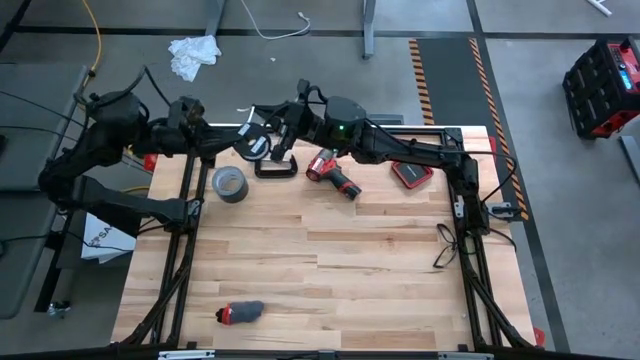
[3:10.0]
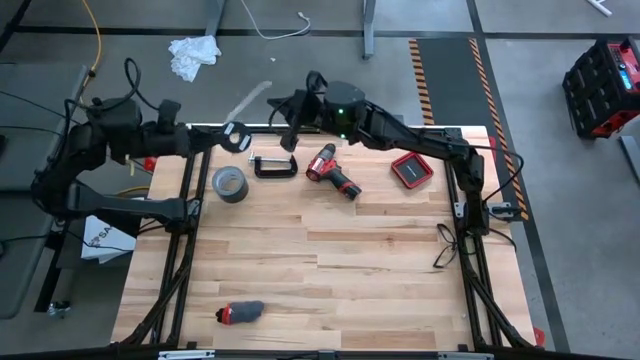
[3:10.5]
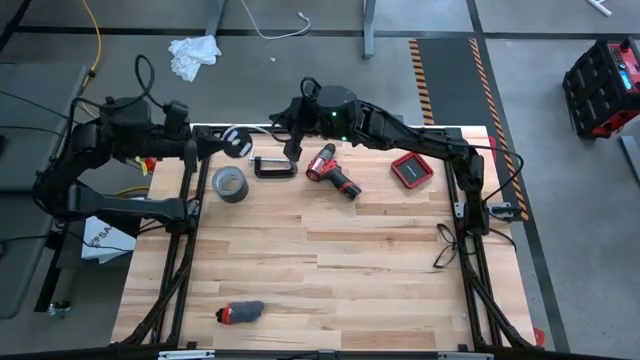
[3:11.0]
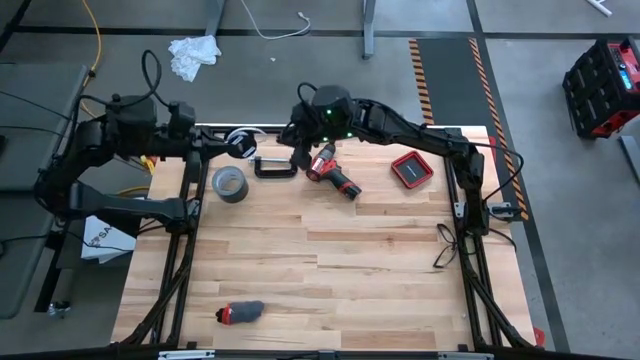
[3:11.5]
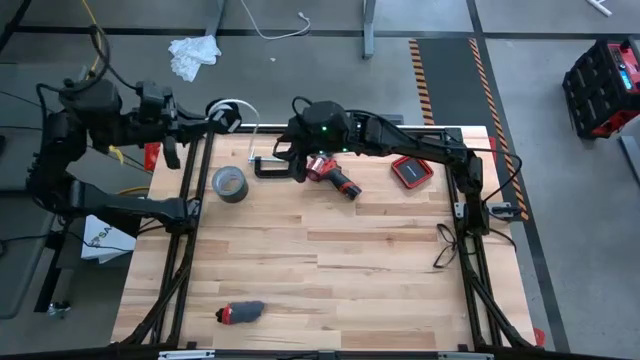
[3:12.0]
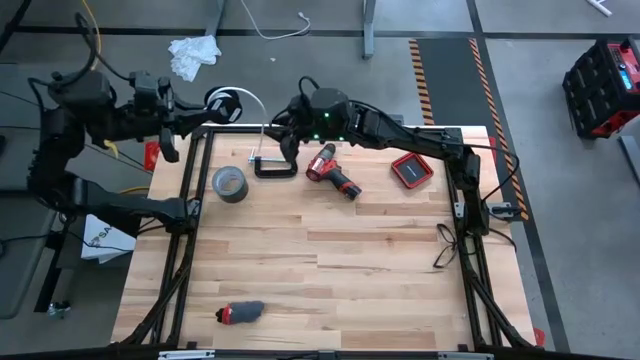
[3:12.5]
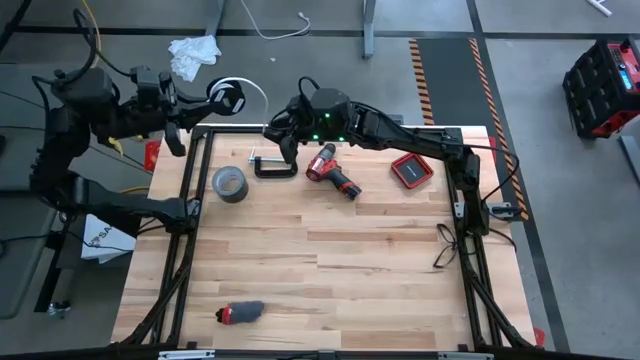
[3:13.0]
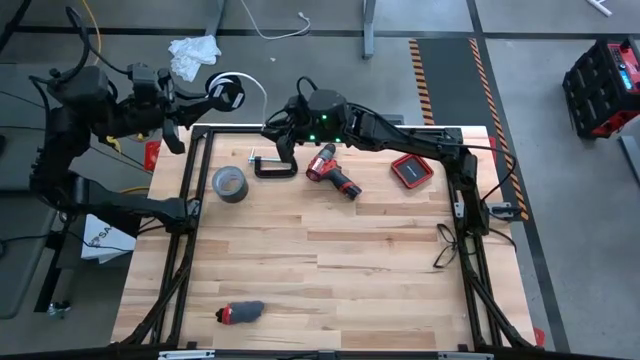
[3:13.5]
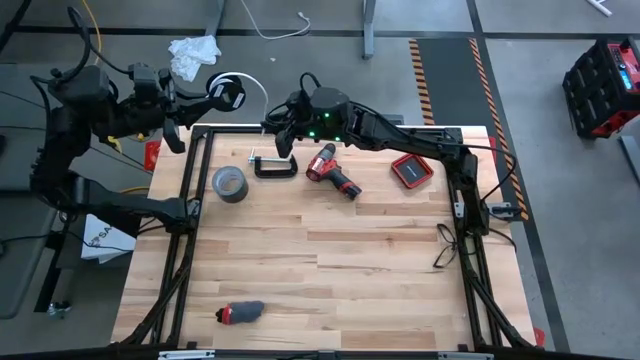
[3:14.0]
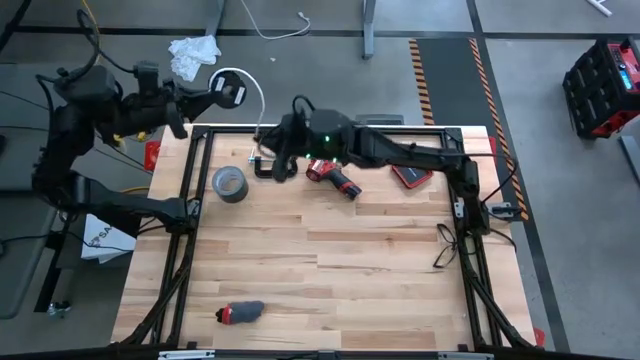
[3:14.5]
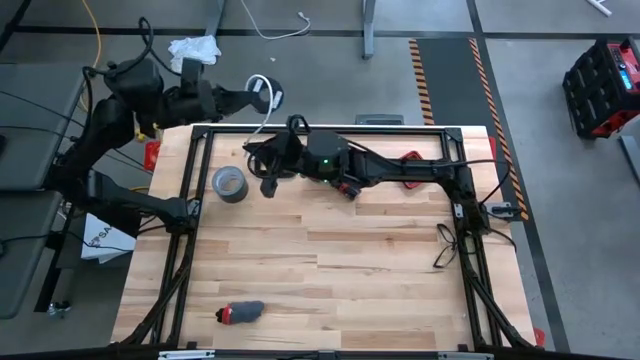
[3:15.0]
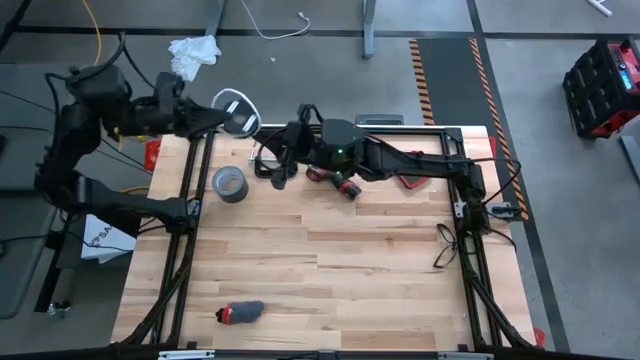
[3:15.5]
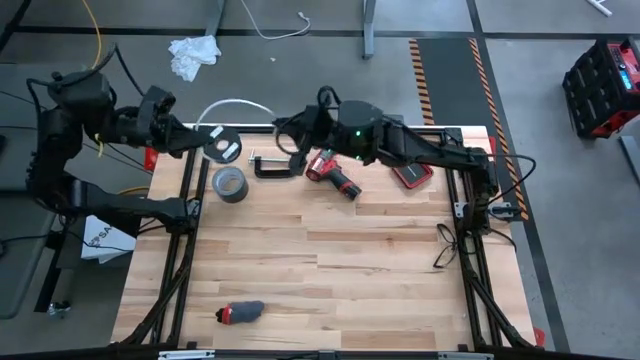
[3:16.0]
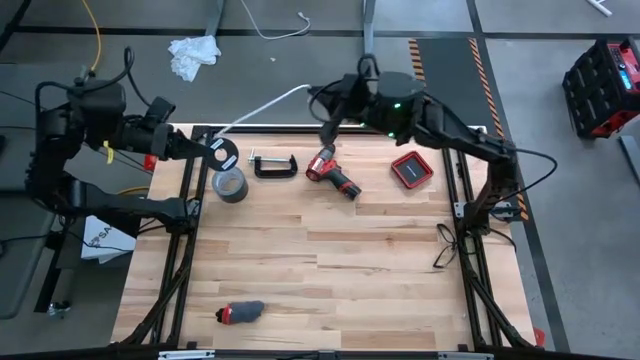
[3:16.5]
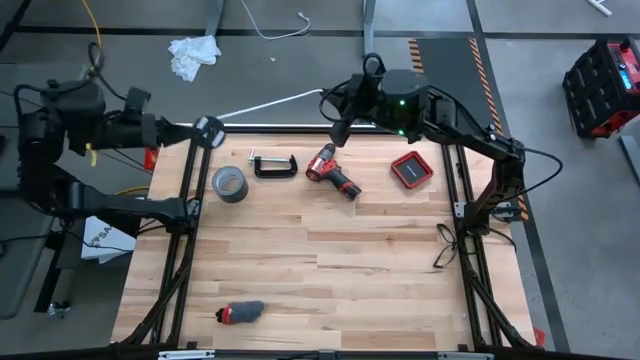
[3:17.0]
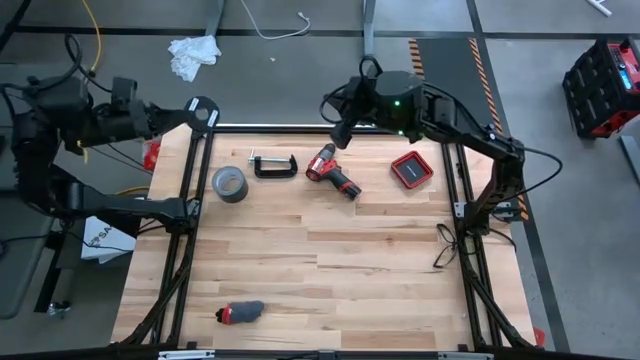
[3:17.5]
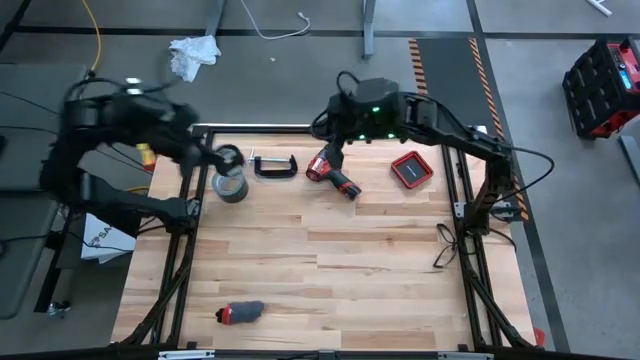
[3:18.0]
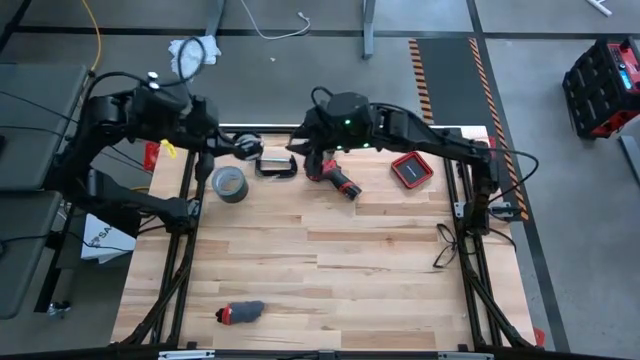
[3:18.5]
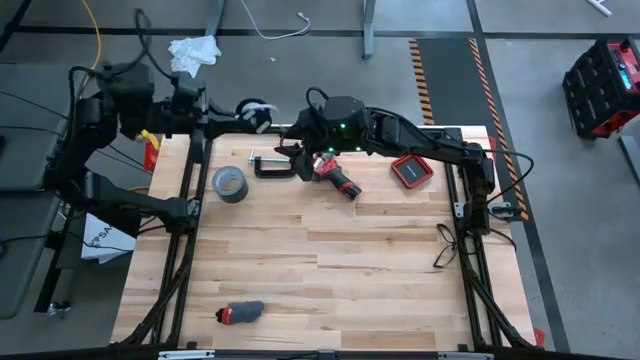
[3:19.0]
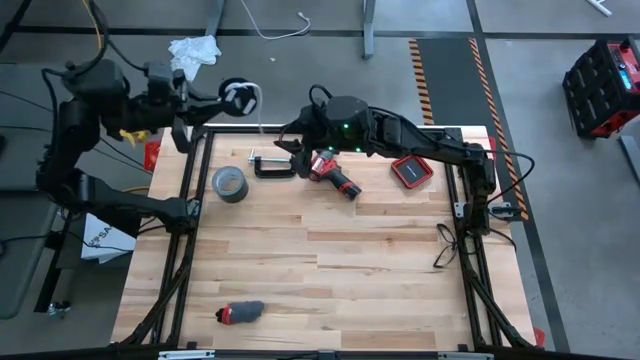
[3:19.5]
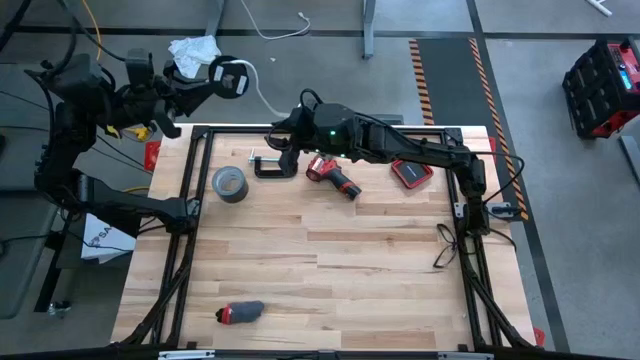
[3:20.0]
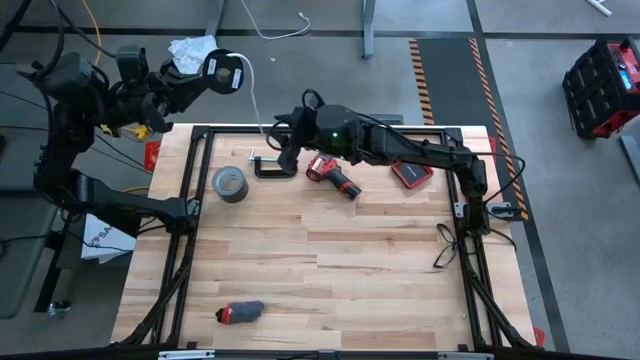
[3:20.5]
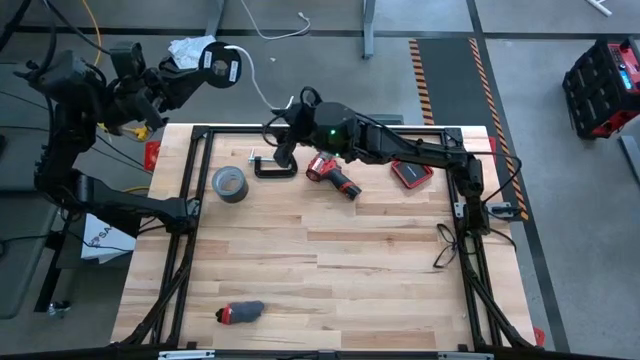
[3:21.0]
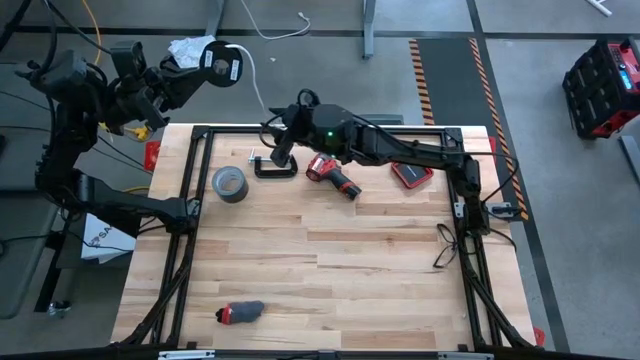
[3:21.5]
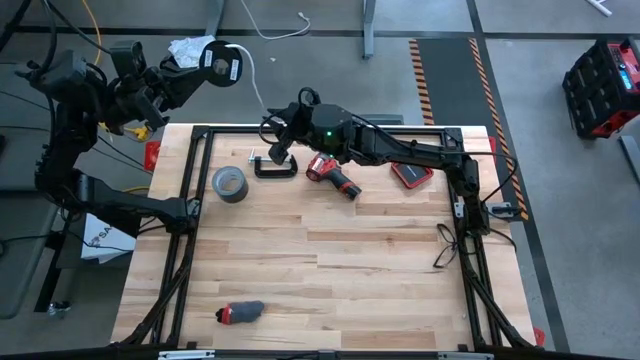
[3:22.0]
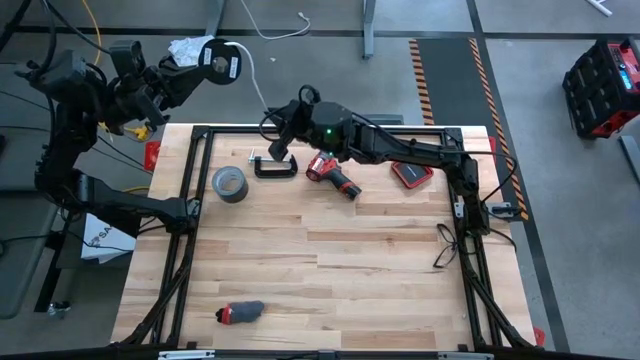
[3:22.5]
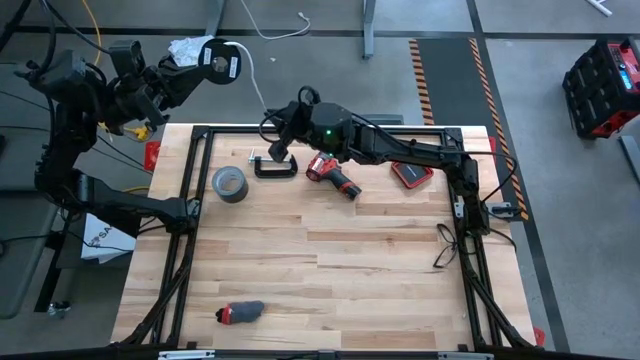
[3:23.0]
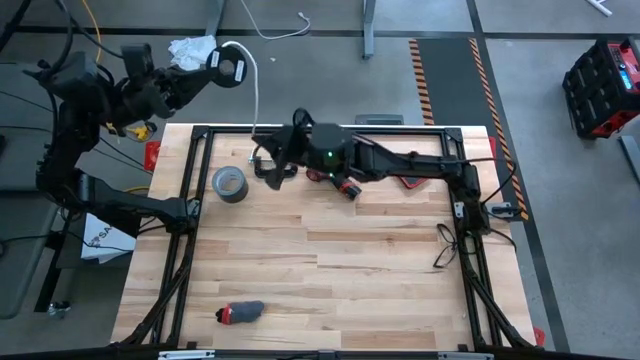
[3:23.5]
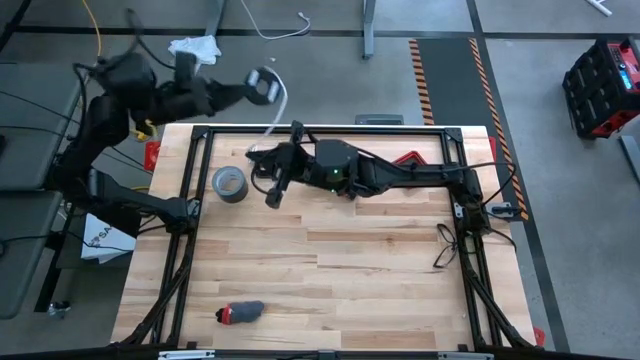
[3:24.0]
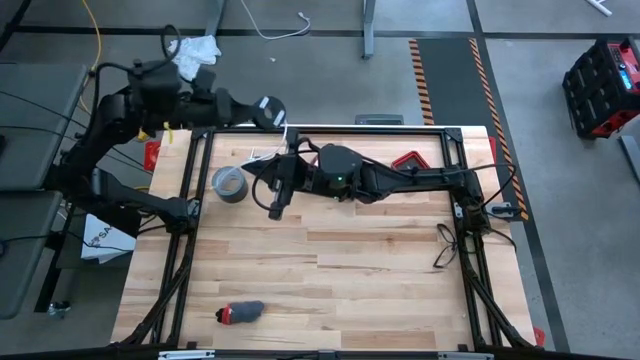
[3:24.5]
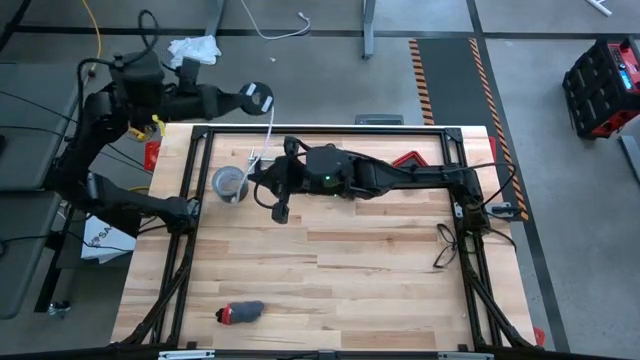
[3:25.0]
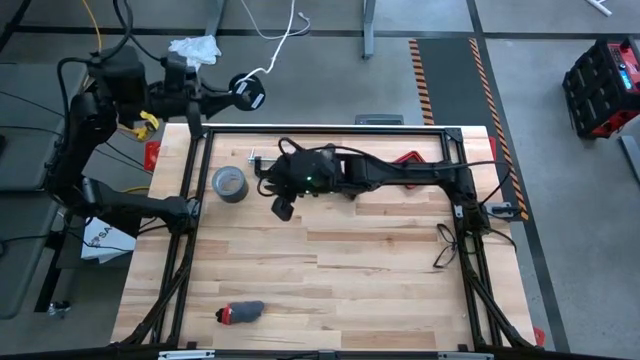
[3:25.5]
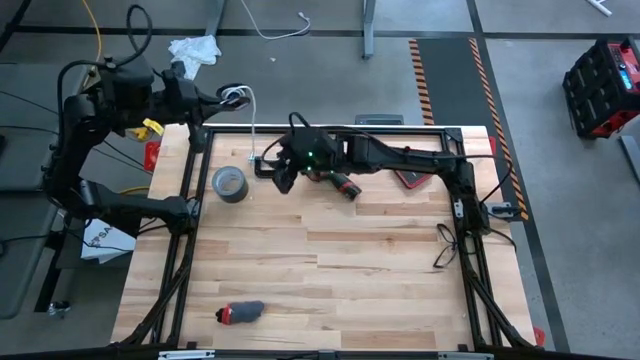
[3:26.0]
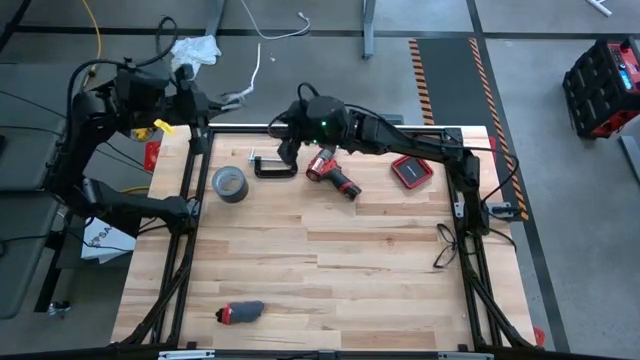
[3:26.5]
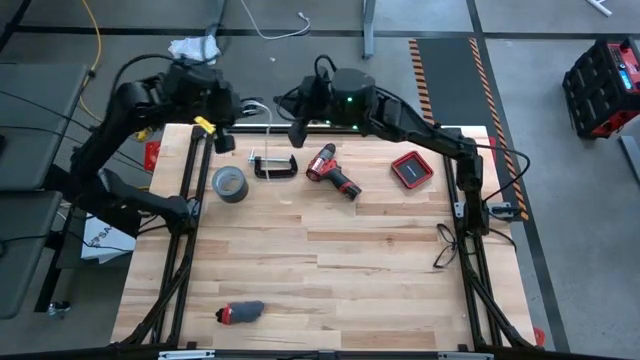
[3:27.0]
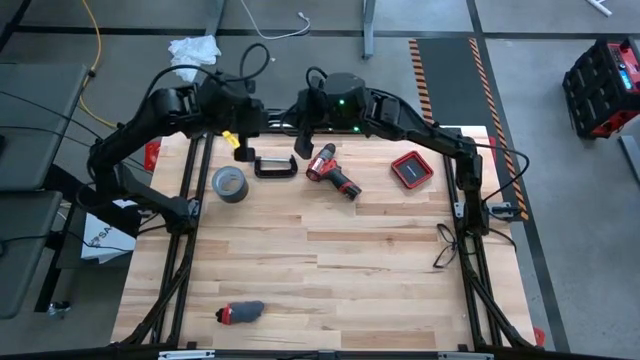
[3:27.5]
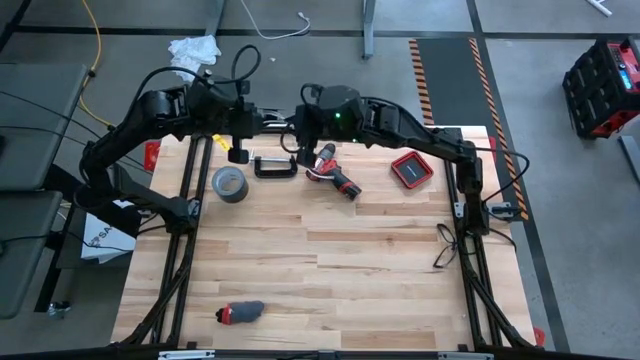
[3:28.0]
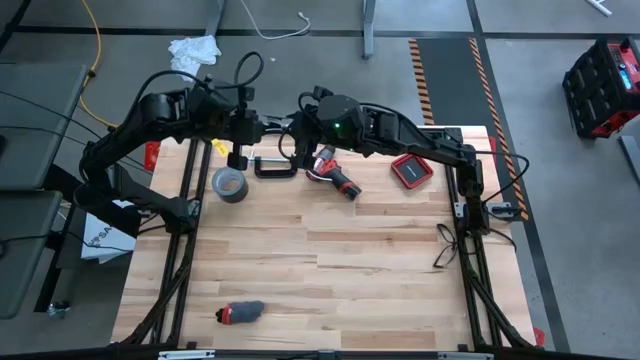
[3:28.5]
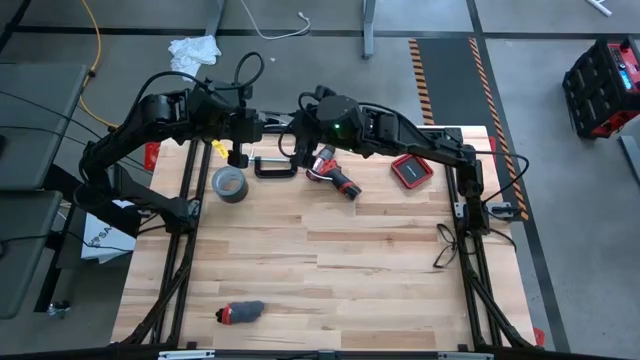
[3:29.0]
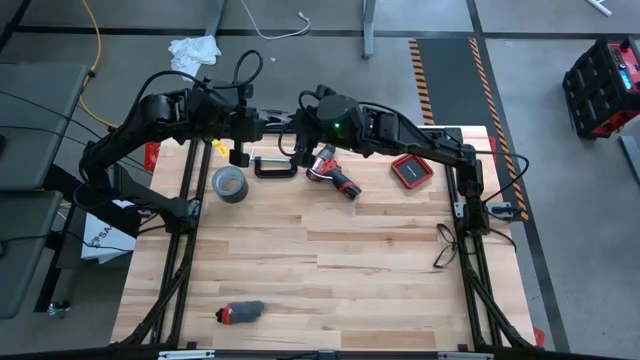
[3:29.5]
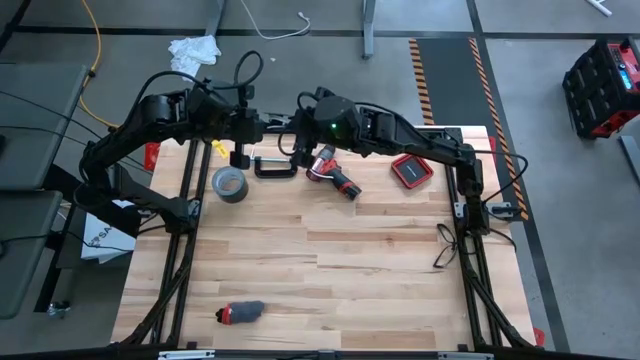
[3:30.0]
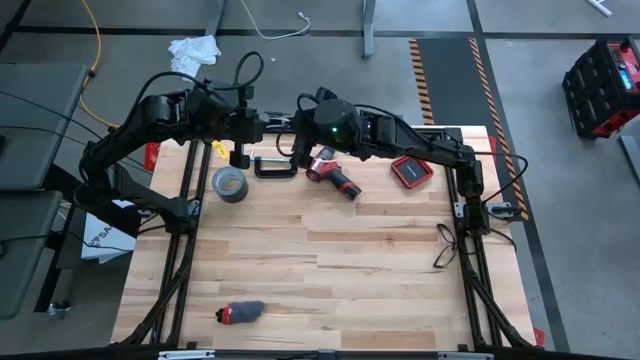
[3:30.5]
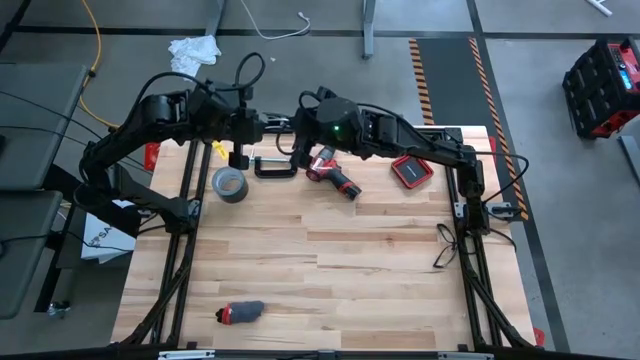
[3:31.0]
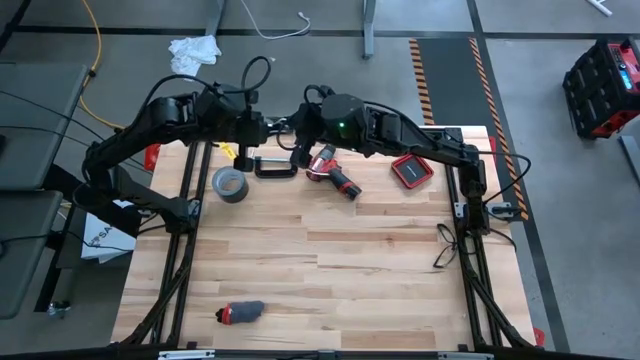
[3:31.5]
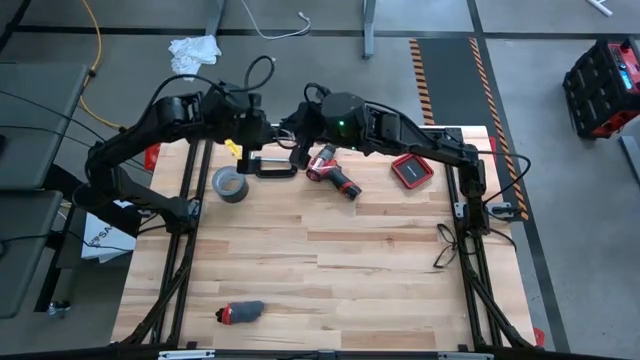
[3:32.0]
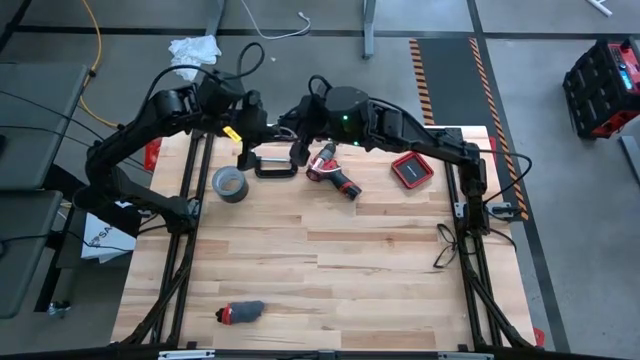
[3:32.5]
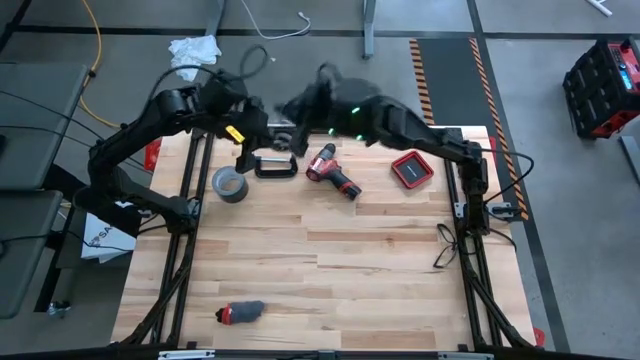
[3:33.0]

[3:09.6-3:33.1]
Task: Coil cords
Coil the white cable wire into the black spool
